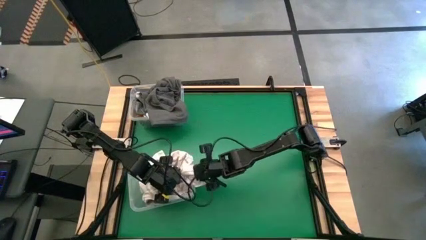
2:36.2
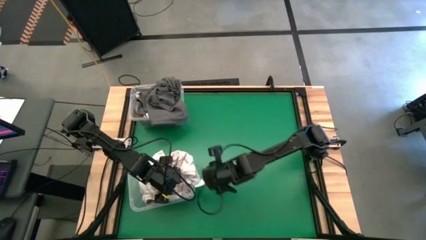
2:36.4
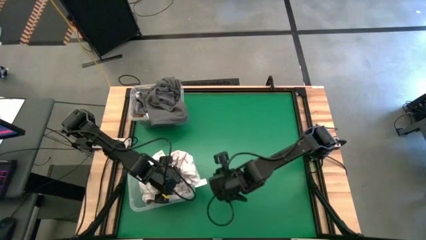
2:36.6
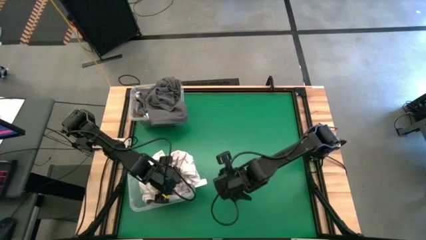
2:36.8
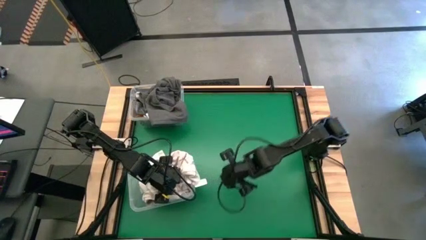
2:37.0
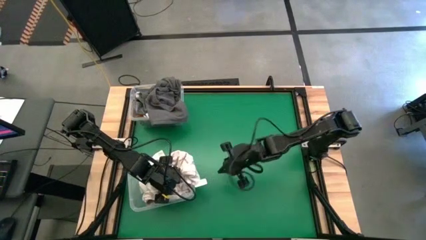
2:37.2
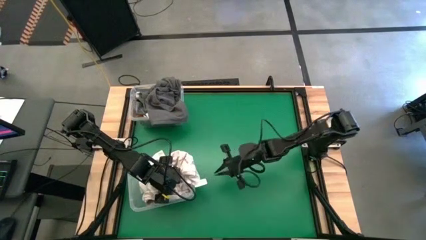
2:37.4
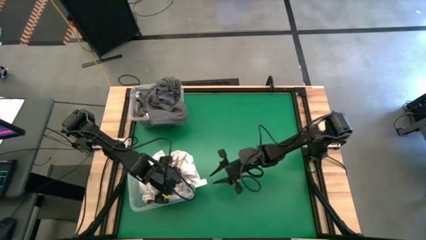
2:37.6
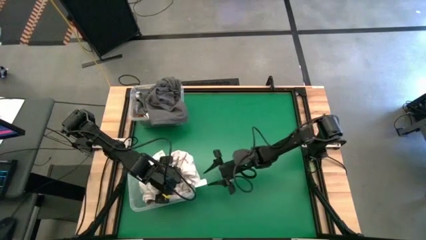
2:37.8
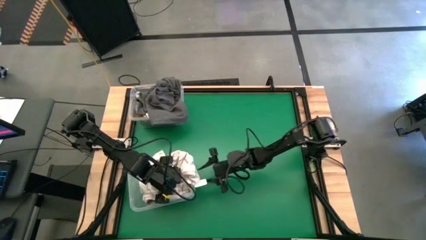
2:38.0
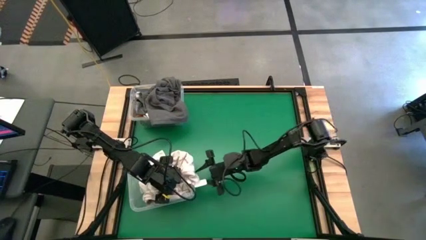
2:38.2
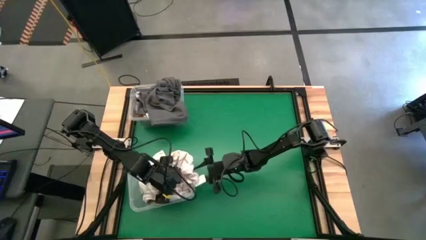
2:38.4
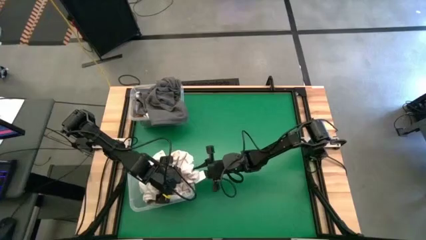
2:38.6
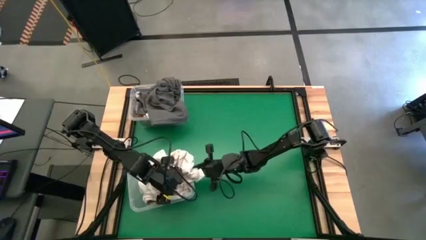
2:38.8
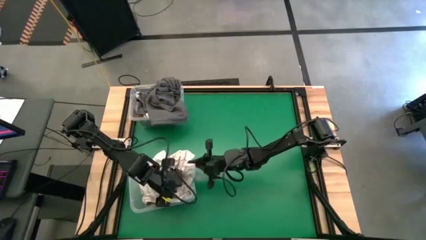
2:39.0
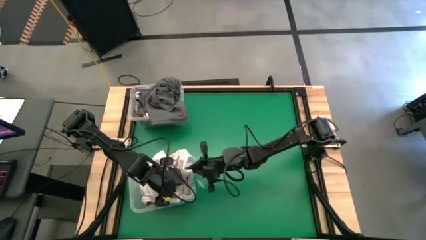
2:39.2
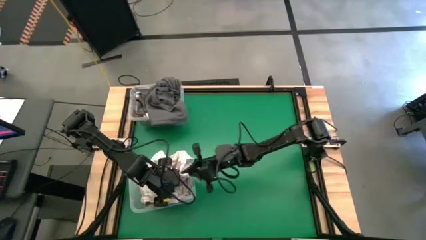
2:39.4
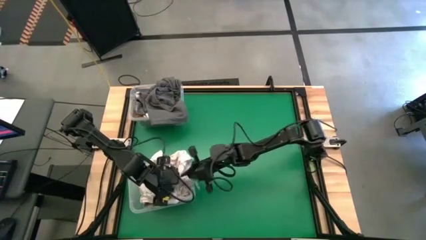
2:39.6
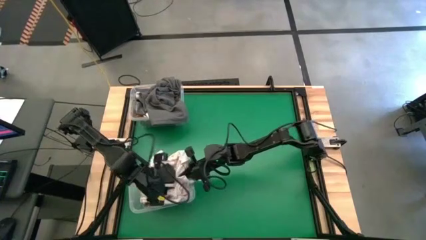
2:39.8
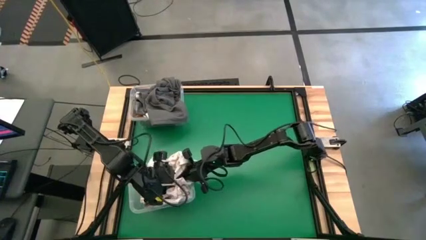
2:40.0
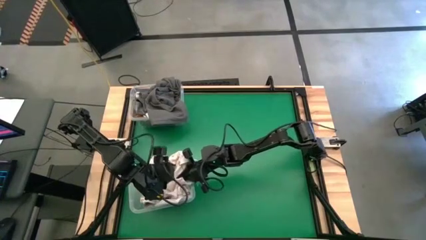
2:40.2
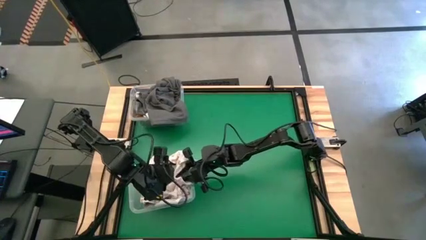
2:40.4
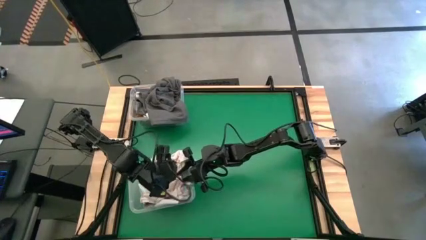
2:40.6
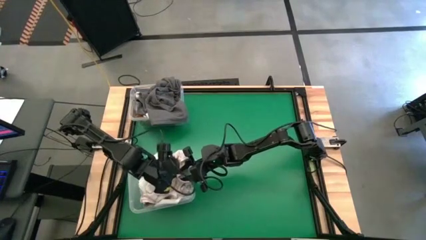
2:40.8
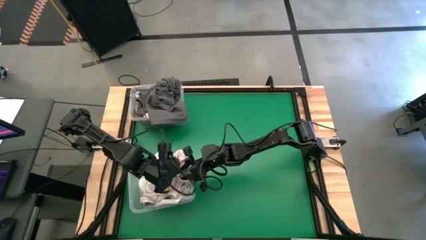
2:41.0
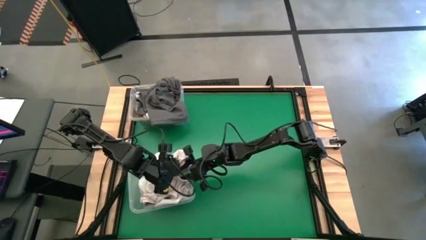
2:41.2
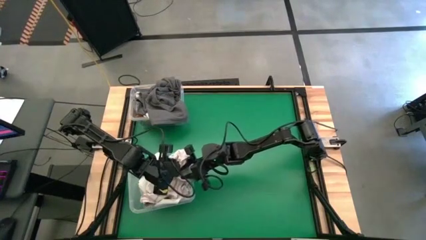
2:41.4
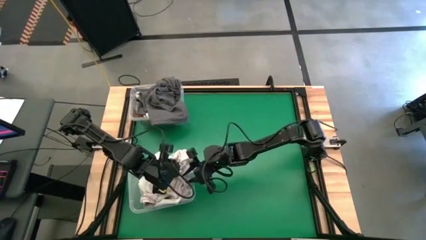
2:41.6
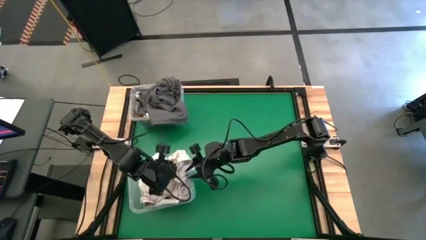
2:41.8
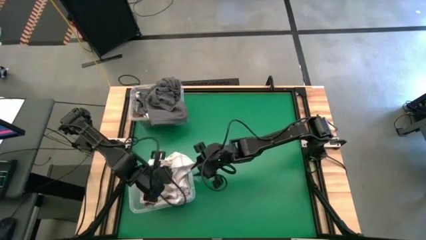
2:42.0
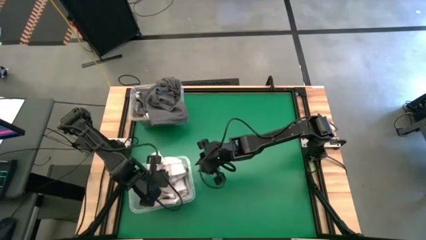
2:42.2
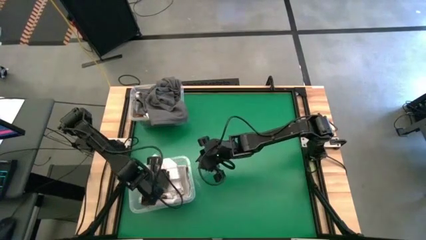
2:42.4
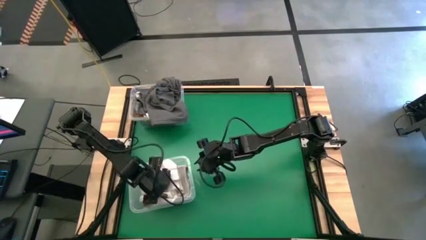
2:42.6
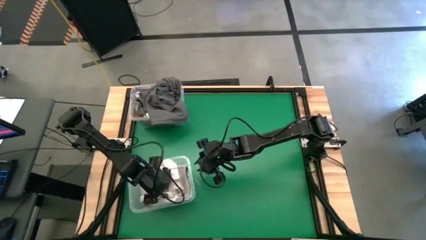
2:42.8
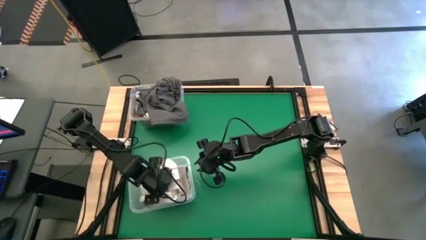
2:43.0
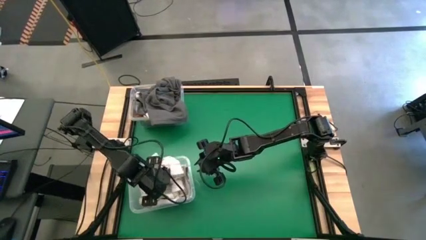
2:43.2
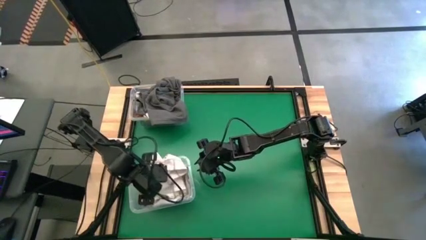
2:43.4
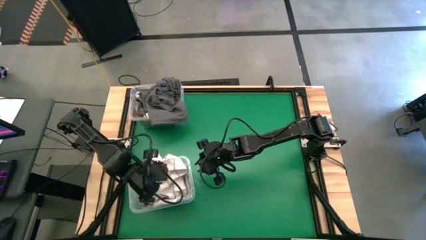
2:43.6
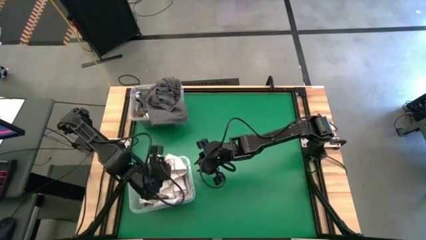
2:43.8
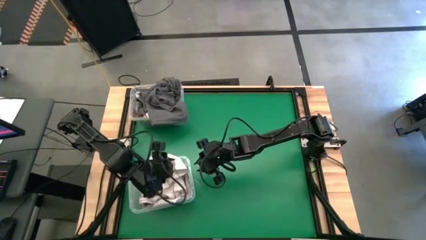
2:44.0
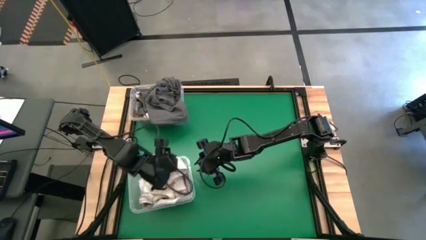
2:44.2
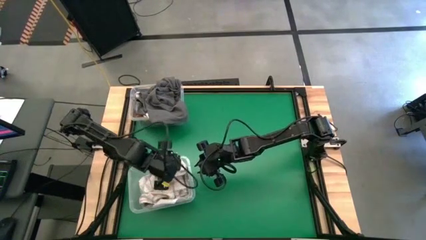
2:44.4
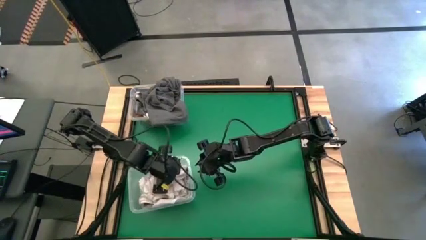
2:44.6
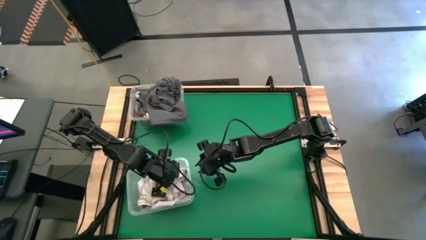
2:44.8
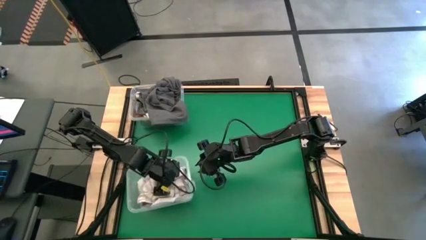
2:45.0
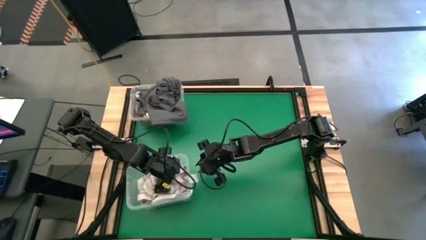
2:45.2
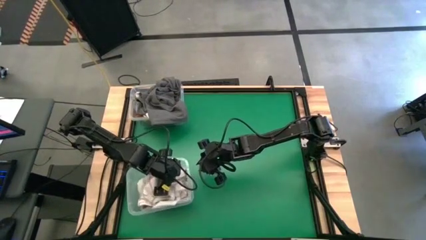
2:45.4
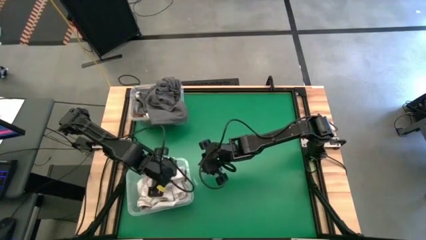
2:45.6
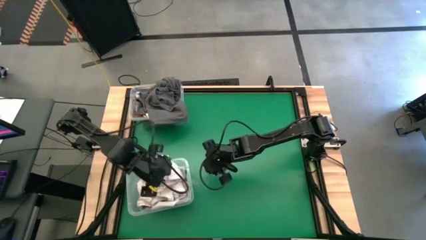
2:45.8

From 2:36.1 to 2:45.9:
Task: Sort towels by color in basket
Put the white patterned towel into the bottom transparent bin

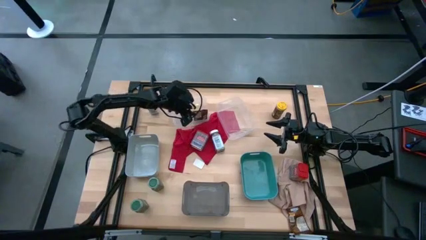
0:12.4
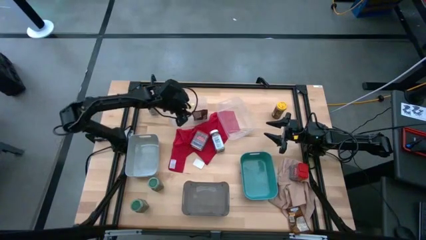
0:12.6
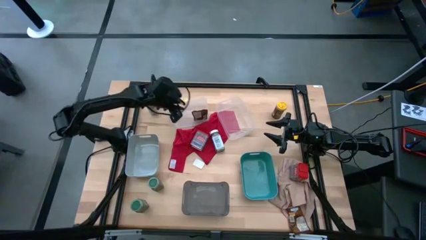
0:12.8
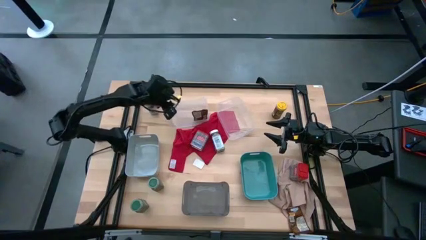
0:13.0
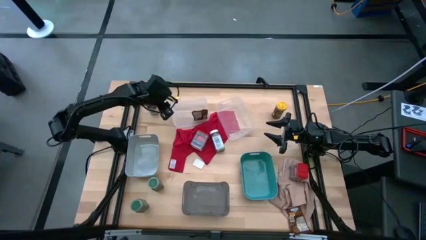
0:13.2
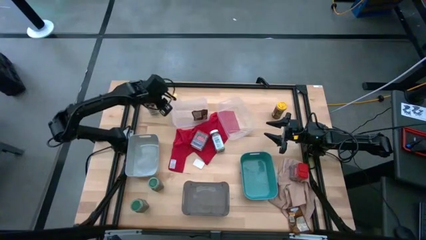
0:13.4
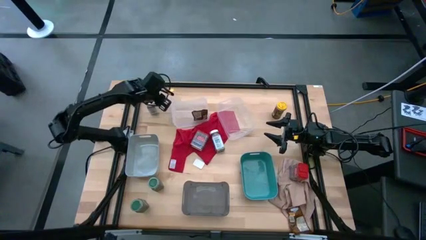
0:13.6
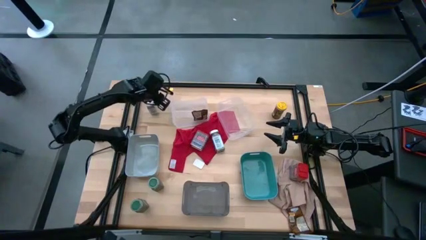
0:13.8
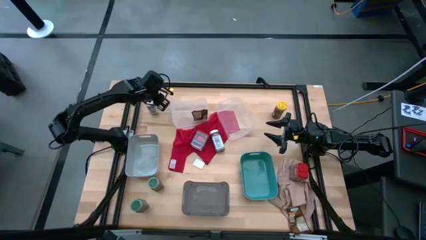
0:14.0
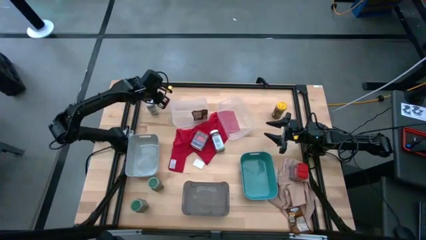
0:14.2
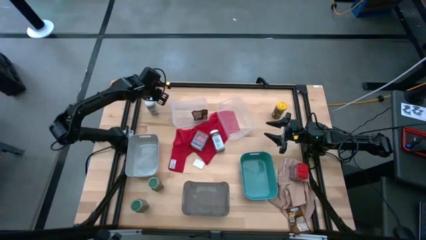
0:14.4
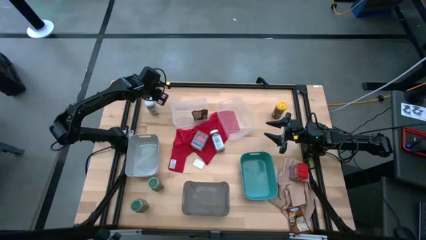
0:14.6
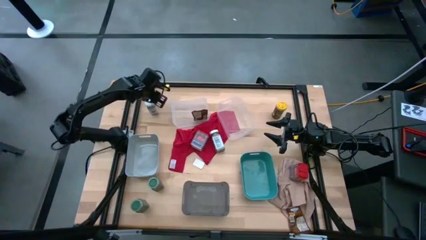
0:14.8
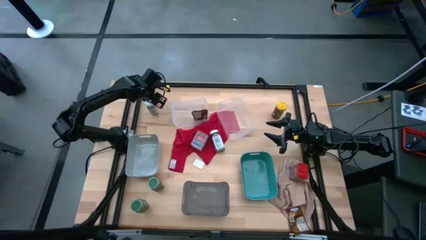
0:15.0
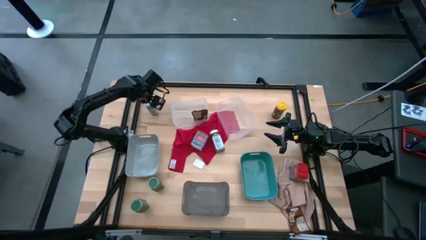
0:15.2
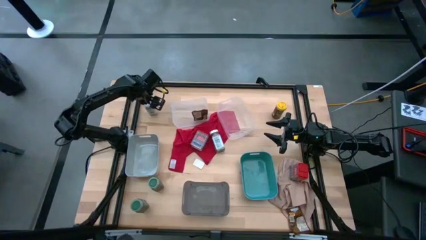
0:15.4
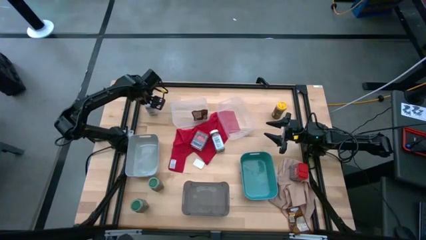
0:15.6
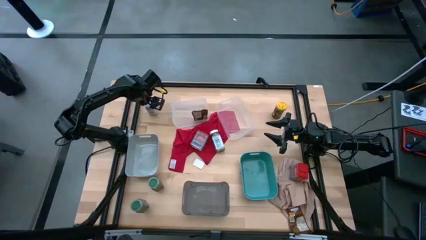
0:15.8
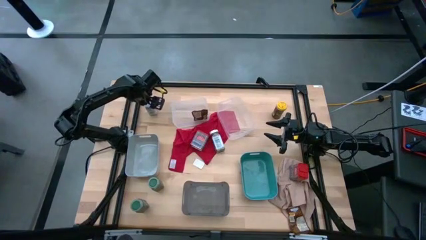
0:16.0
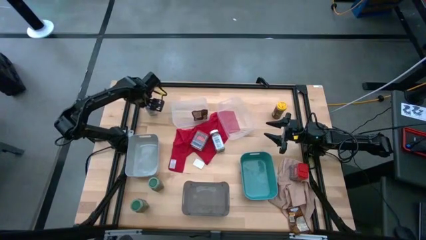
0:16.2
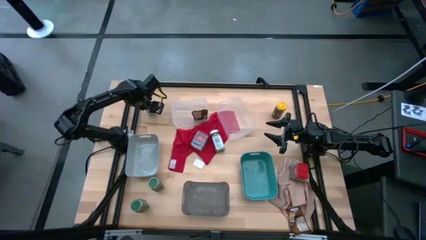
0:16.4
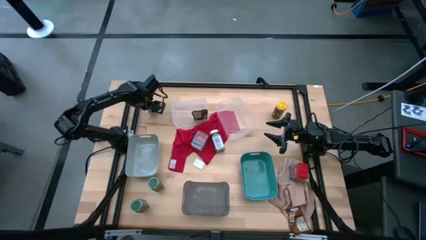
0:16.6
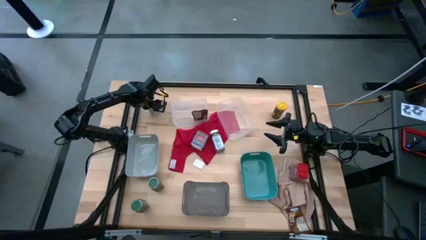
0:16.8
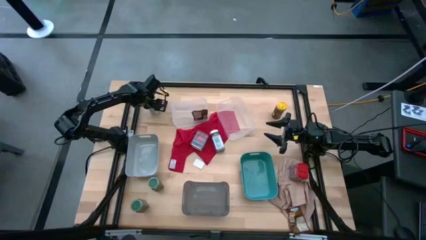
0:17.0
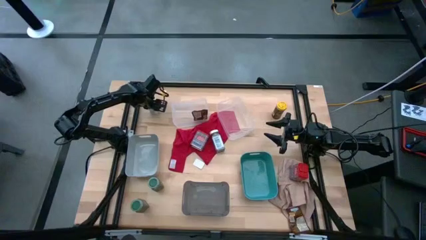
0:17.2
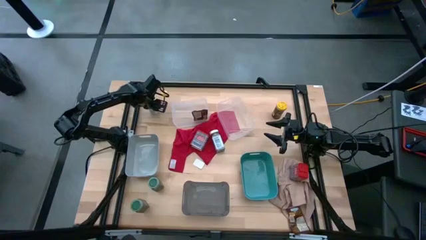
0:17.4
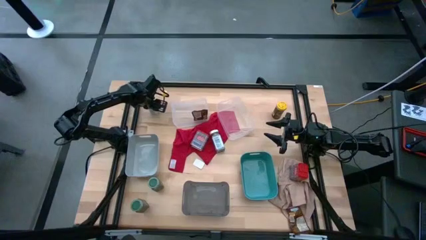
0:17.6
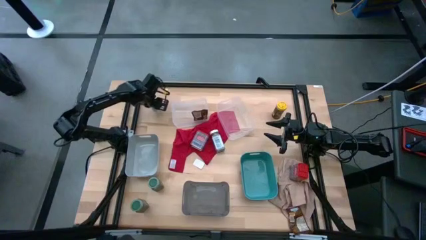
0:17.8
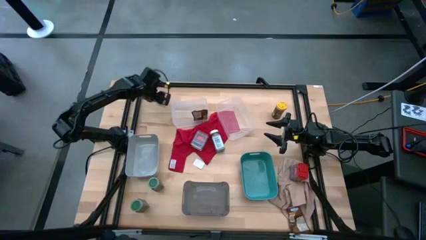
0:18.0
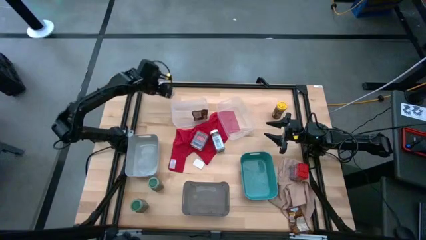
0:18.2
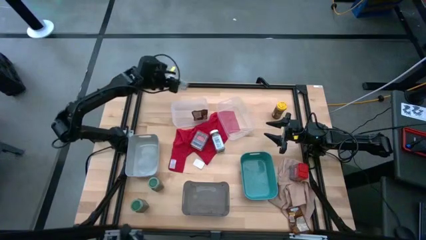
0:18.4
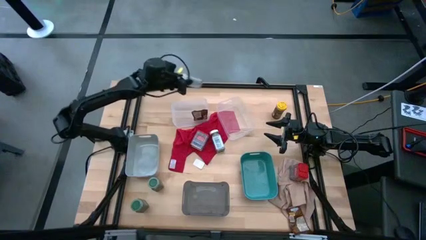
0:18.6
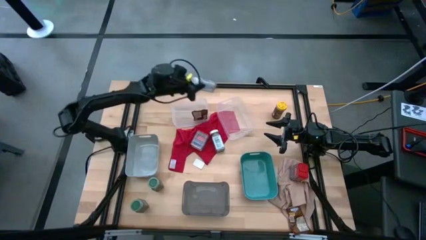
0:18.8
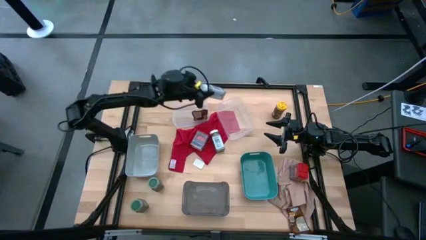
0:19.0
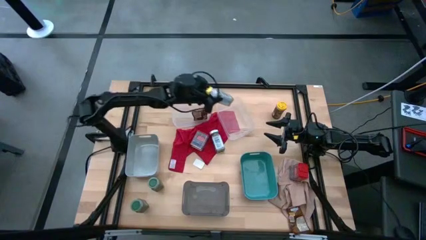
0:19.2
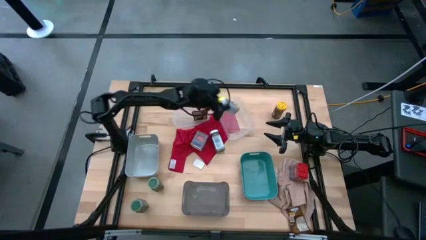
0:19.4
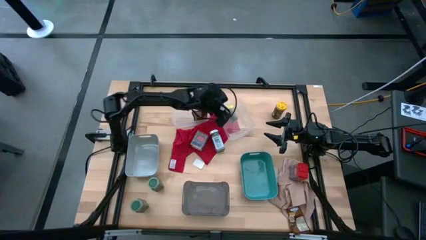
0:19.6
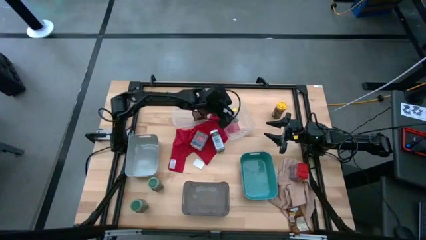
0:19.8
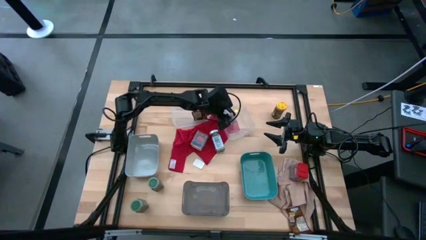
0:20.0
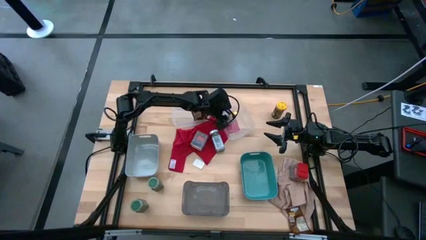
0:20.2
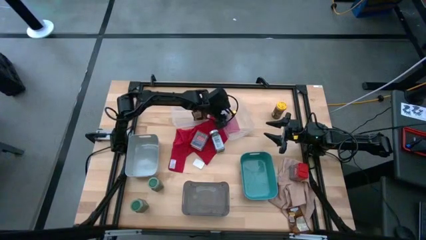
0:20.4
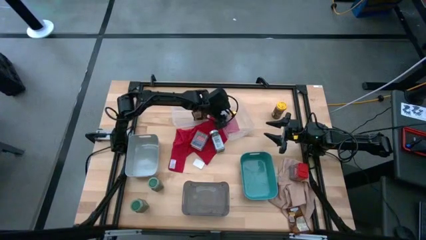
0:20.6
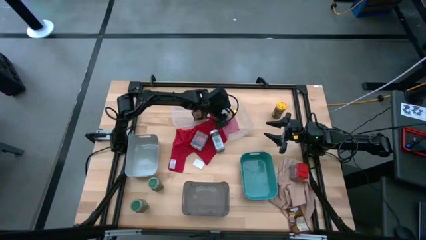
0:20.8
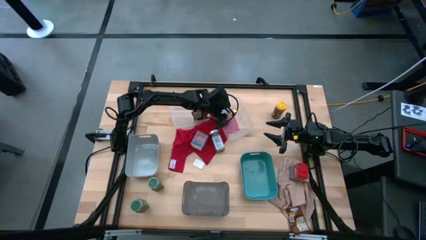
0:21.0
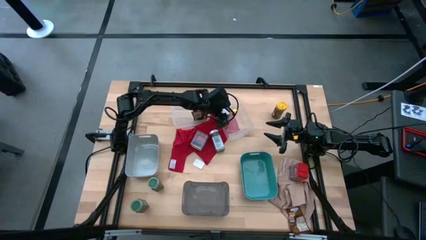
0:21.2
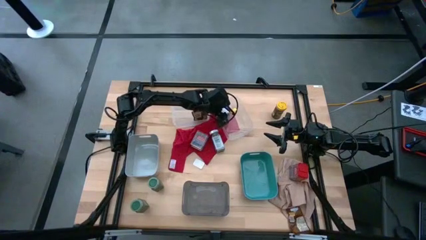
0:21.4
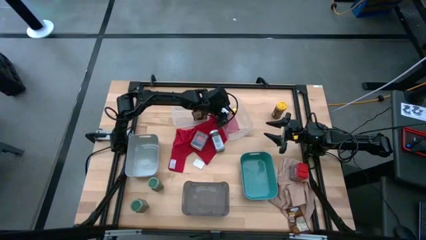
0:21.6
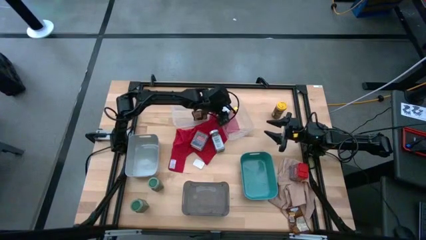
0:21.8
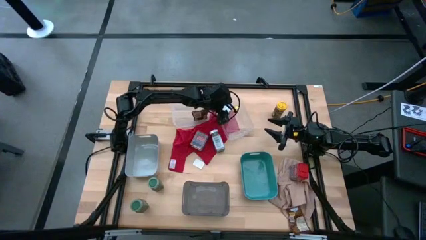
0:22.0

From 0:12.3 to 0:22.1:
Task: Sort spices by type
Put the left white seasoning bottle into the right transparent bin
